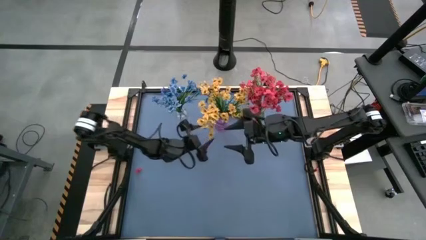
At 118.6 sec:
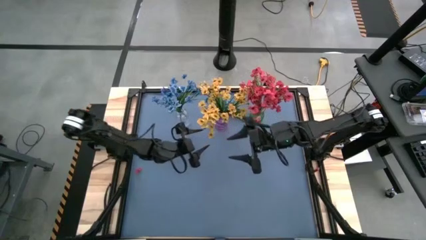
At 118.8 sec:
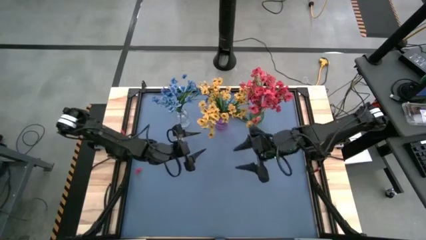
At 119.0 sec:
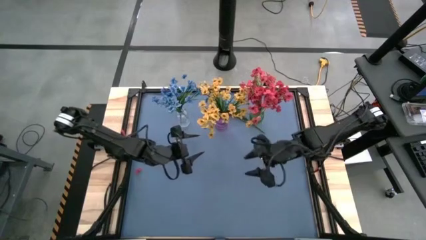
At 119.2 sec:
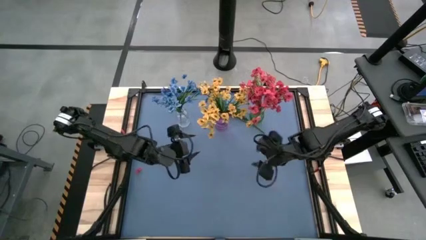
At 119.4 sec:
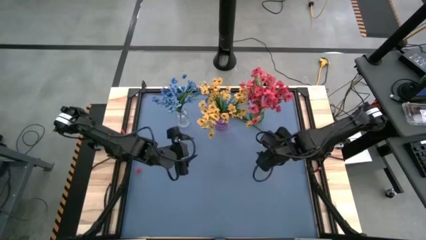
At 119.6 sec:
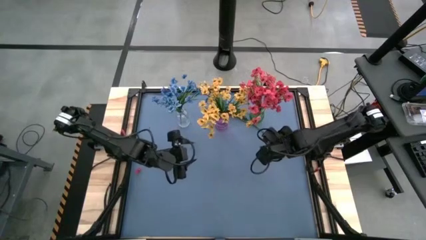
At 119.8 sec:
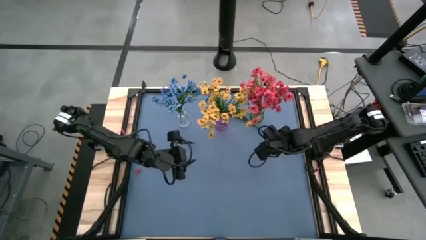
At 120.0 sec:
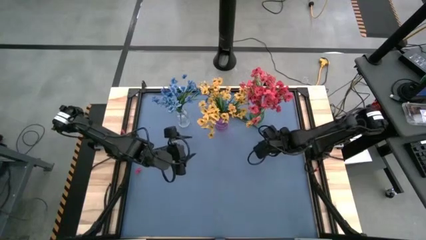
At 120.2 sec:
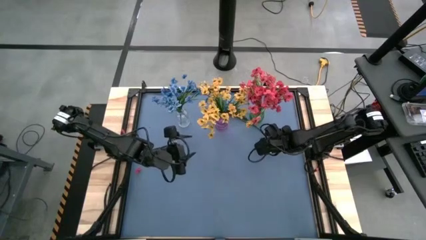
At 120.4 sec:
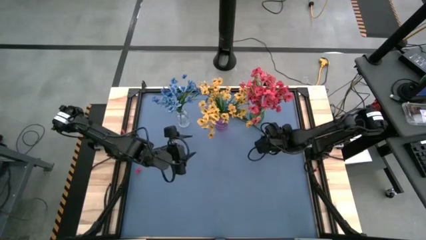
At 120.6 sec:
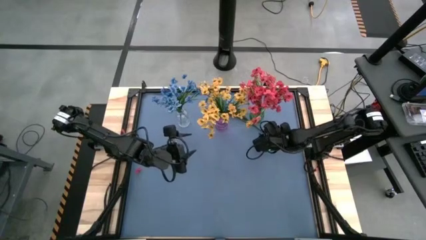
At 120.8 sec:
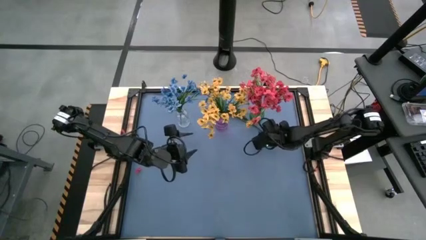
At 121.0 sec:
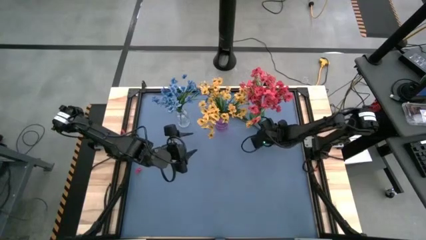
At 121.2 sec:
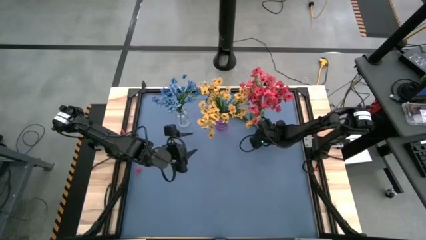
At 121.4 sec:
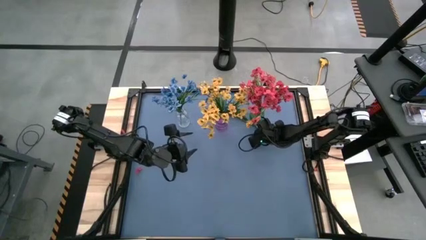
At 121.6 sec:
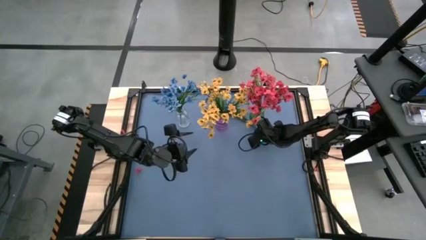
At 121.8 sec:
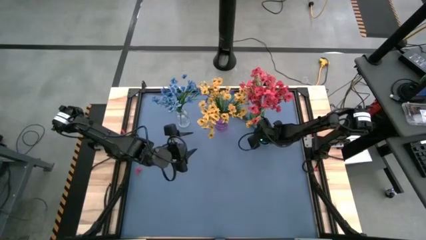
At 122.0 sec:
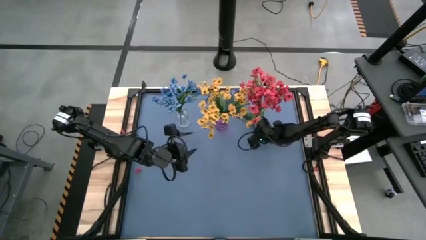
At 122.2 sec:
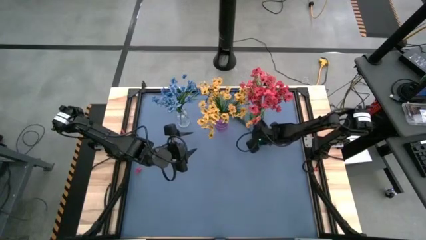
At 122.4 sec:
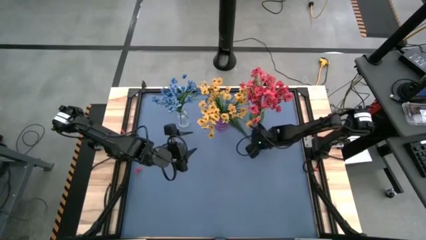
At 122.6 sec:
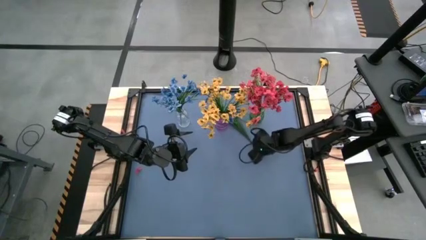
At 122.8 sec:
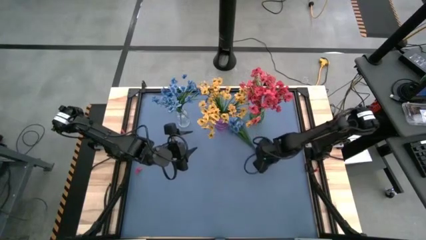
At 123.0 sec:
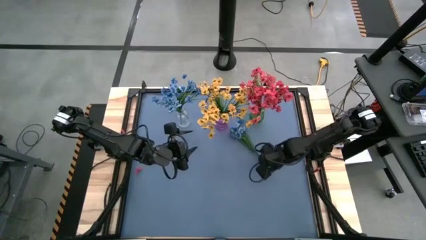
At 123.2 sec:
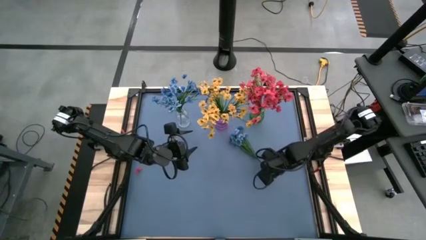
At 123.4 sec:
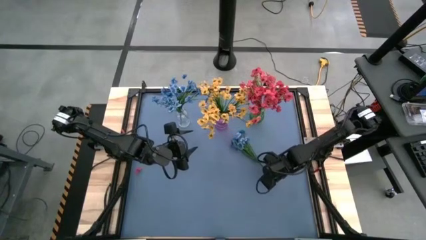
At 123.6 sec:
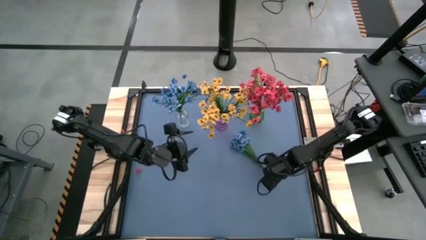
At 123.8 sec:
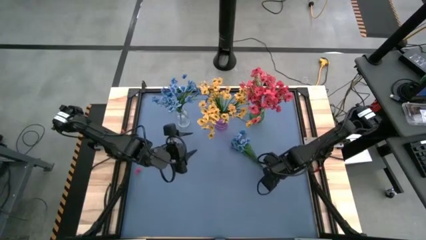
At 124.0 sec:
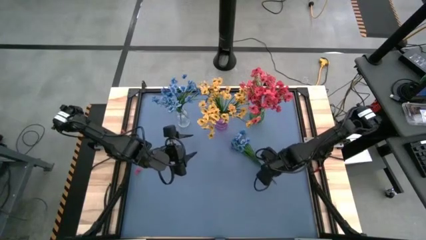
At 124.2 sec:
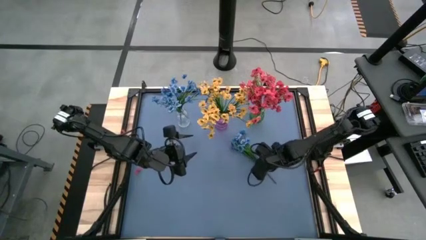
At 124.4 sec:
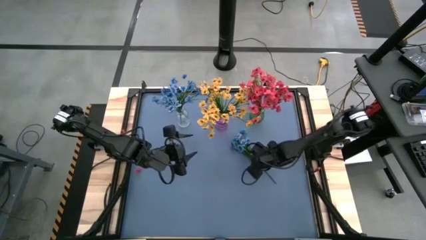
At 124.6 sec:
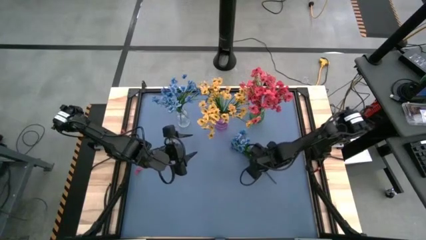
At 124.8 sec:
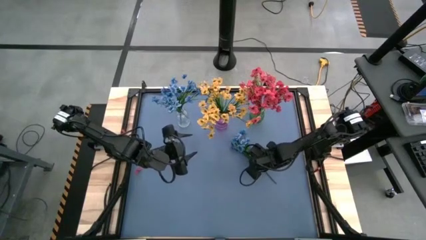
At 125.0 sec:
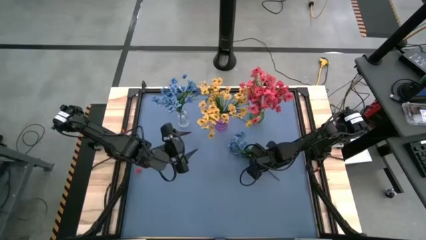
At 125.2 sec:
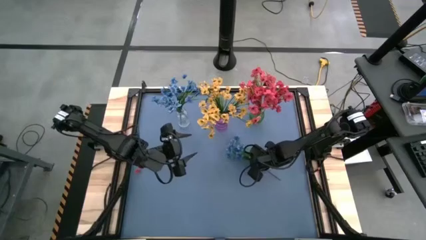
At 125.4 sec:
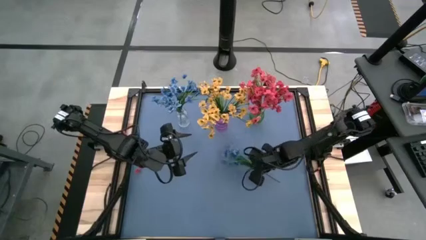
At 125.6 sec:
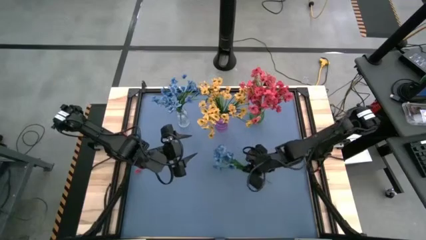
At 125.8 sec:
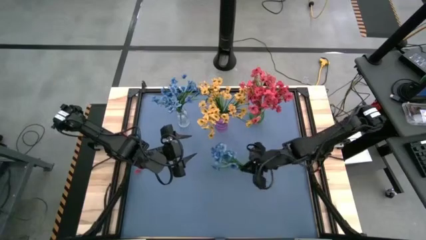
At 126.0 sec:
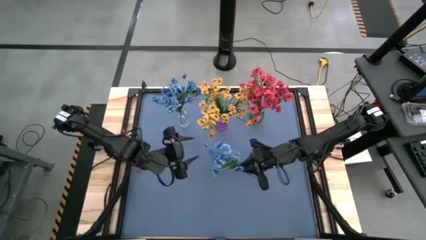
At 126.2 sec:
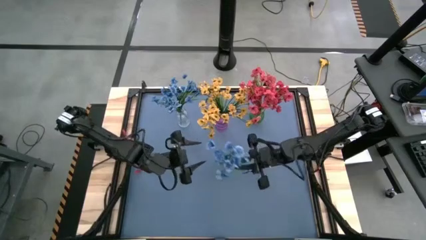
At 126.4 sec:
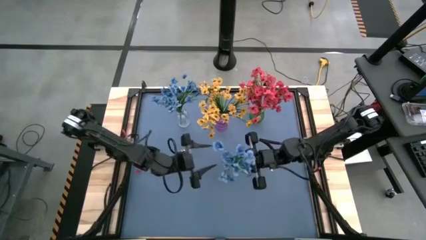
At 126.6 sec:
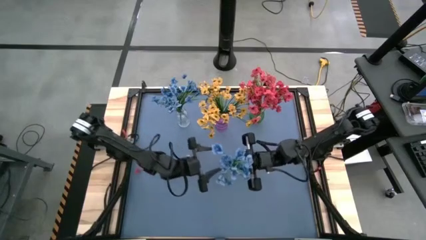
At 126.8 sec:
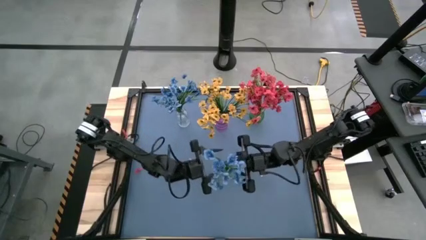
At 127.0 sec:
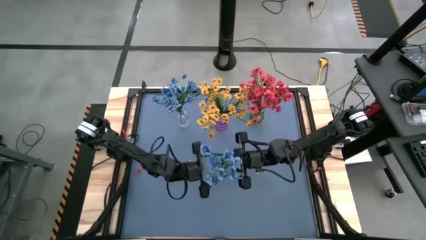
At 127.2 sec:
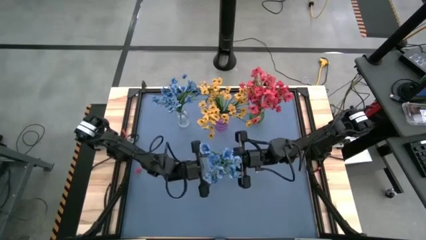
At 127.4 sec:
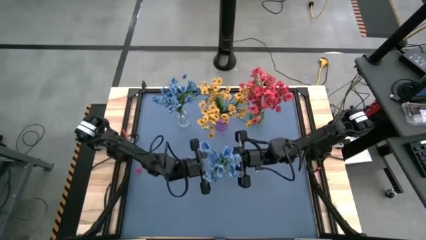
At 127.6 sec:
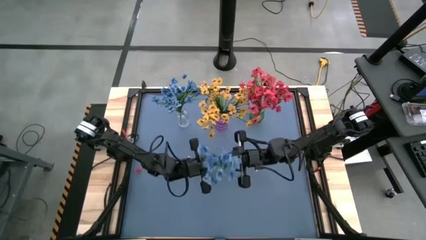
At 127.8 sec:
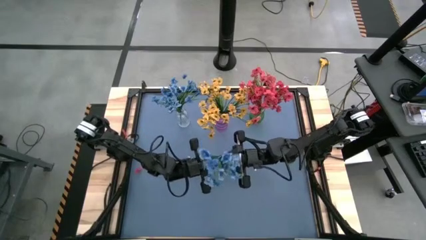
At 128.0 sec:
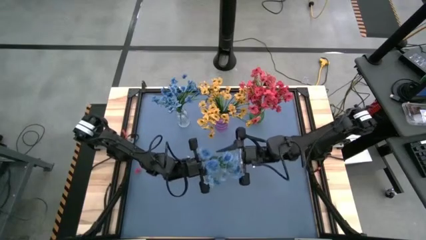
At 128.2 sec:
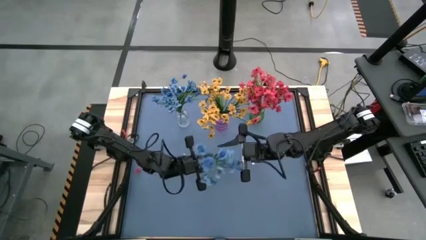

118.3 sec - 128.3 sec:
Task: Sort flowers into vase by color
Put the blue flowers into the transparent vase

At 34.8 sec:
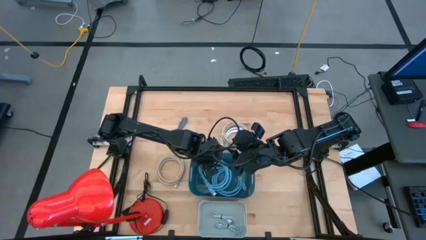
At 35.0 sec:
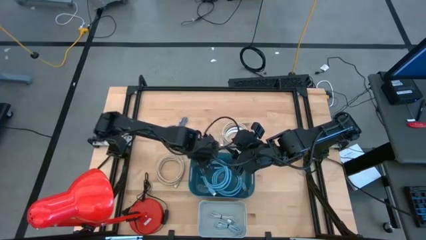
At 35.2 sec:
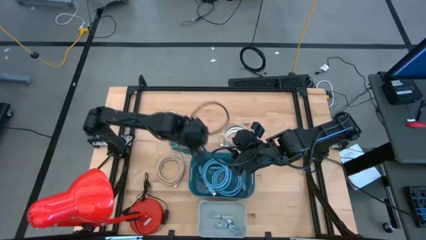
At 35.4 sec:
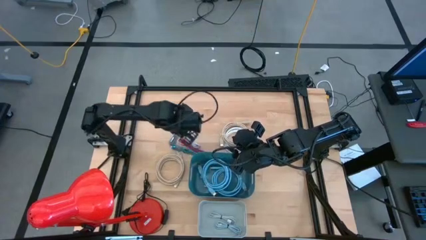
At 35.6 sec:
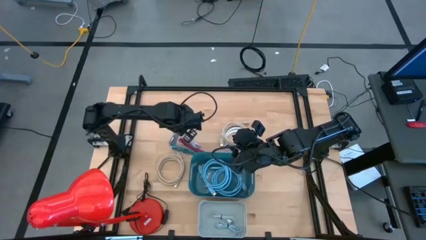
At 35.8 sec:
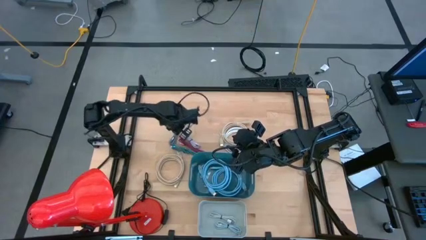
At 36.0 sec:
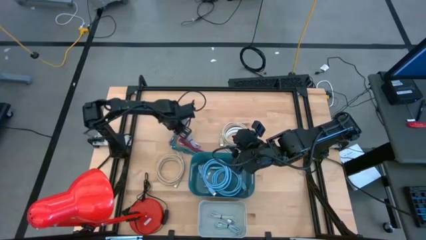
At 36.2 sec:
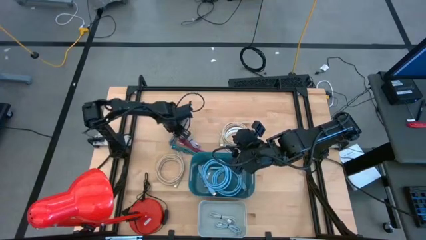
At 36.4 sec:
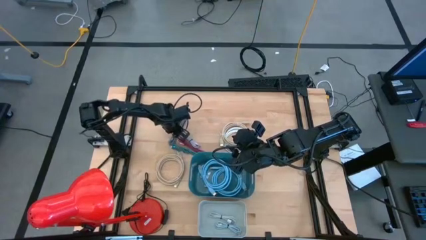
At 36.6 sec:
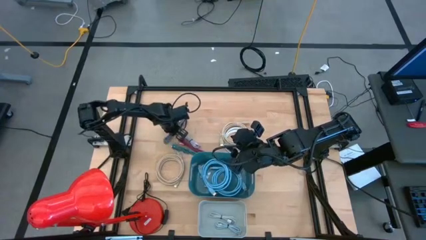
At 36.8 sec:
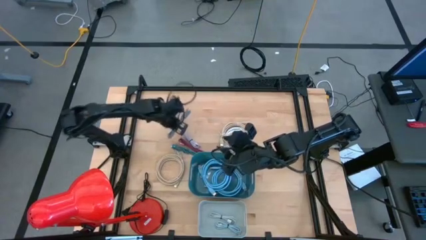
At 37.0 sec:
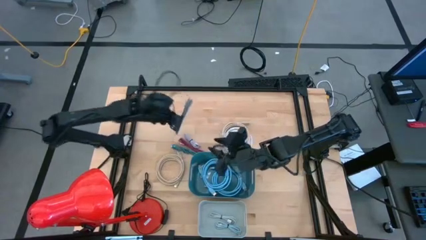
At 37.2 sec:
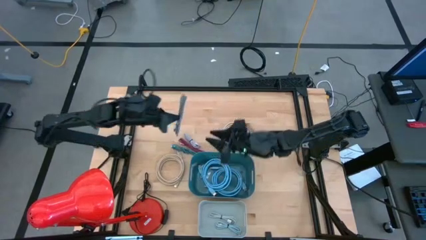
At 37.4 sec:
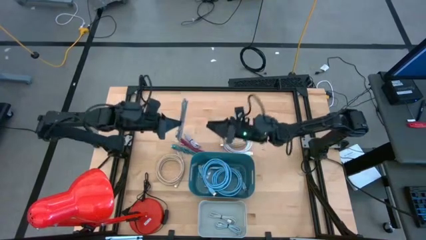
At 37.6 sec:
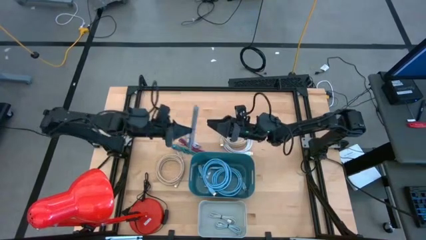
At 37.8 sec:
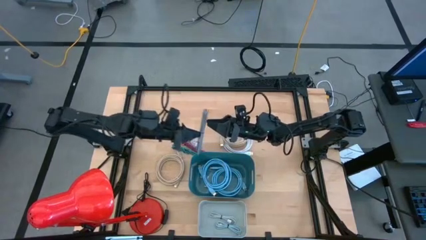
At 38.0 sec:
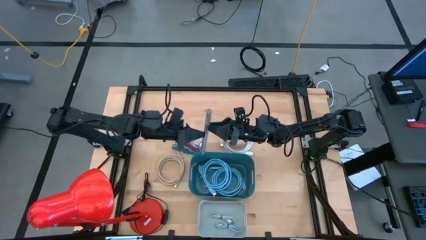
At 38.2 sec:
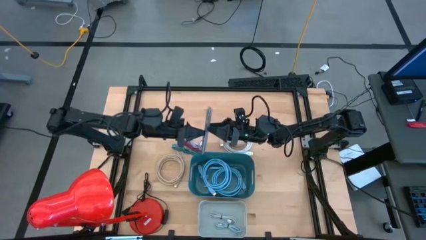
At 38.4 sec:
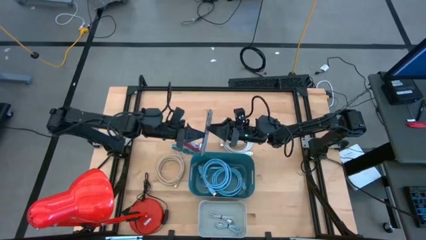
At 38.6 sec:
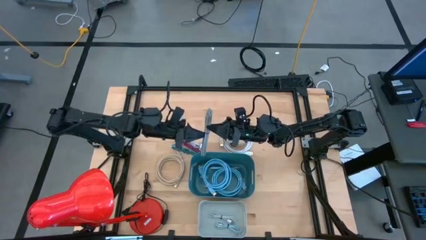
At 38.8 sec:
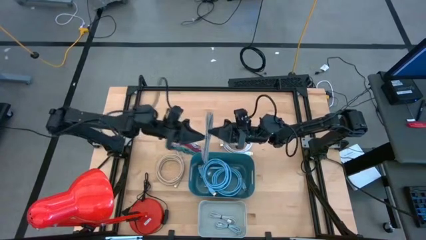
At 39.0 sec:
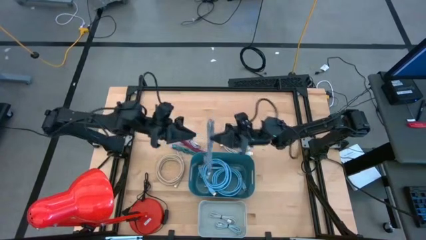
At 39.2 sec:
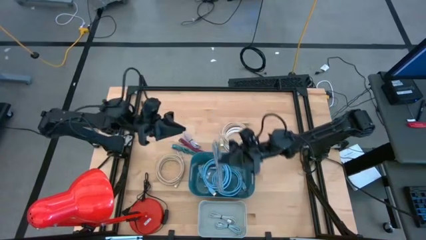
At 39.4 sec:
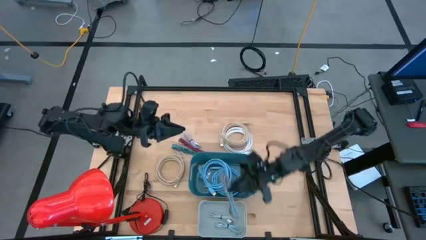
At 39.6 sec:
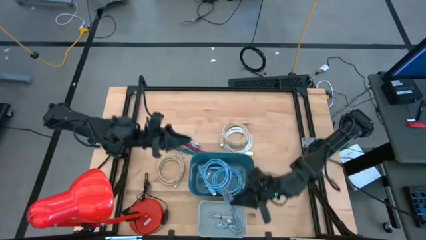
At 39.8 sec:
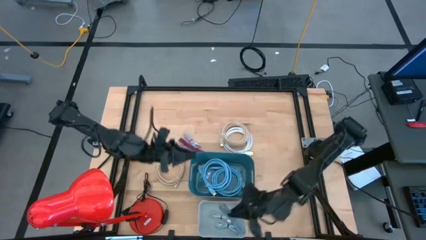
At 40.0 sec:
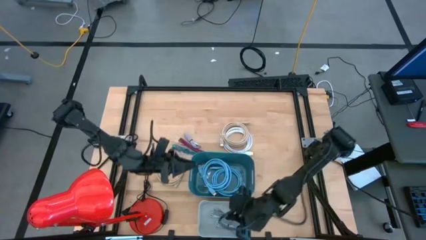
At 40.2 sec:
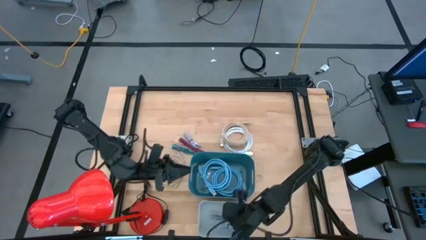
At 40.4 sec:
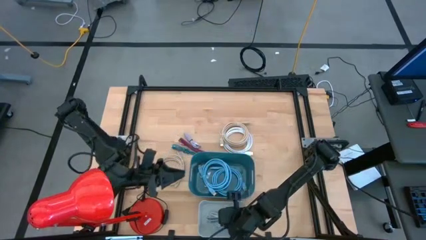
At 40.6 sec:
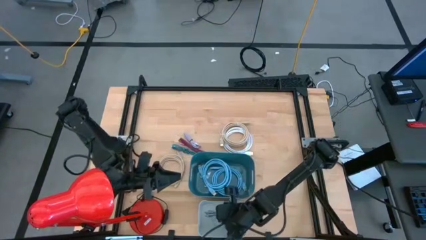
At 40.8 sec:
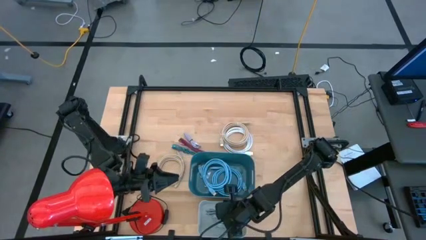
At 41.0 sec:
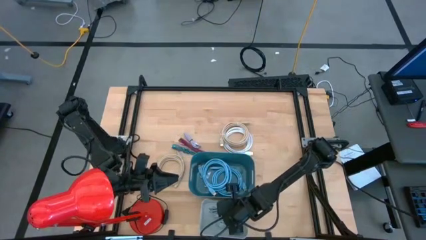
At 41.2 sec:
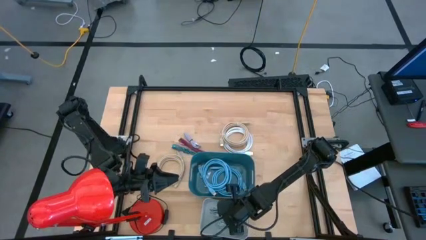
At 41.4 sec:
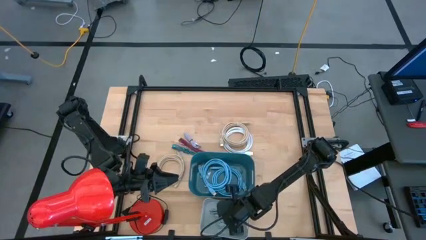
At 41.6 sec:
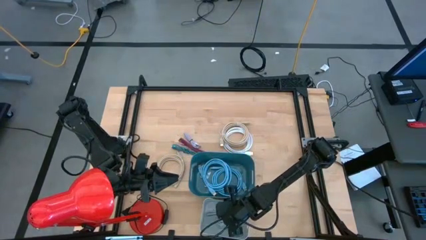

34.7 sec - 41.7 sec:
Task: Pick & Place USB Port
Put the black and white USB cable into the gray bin
